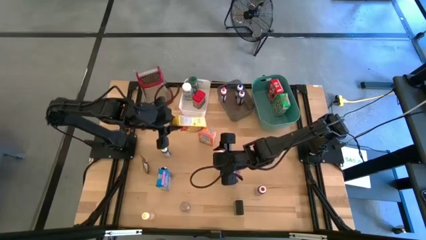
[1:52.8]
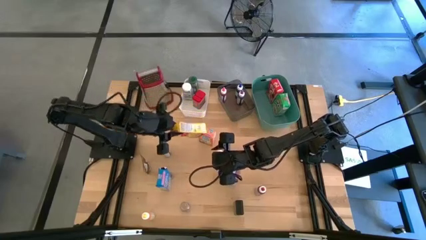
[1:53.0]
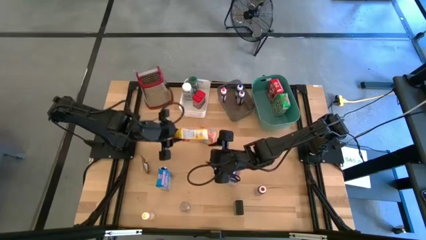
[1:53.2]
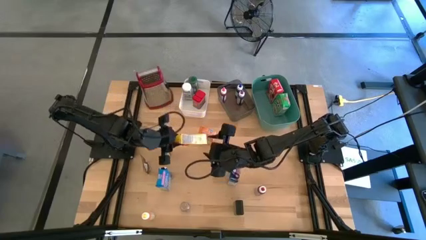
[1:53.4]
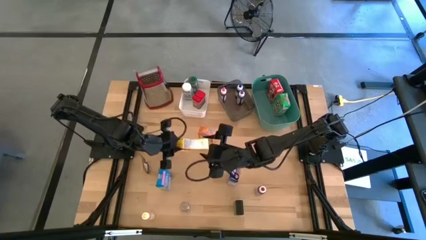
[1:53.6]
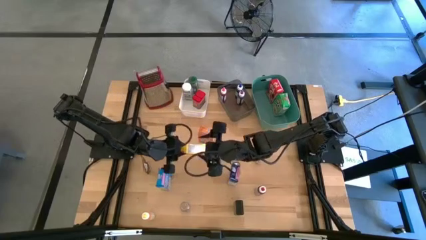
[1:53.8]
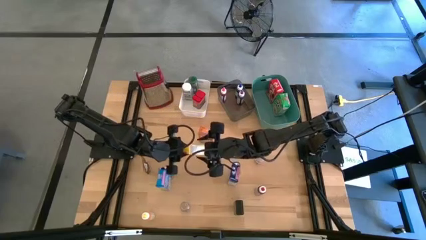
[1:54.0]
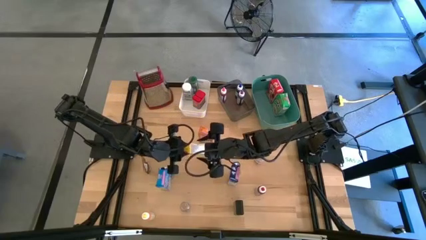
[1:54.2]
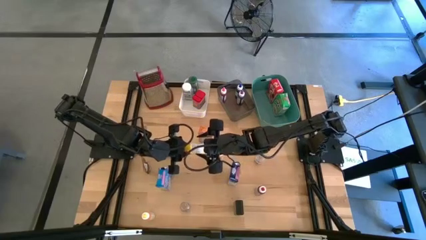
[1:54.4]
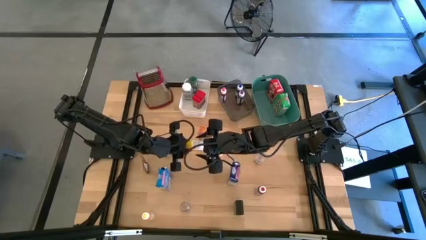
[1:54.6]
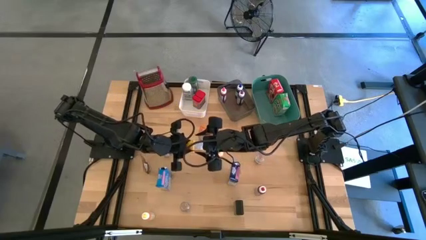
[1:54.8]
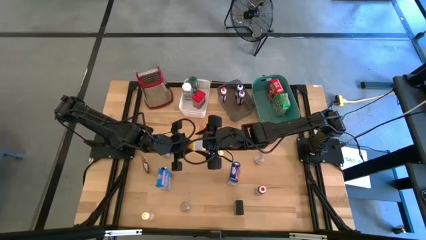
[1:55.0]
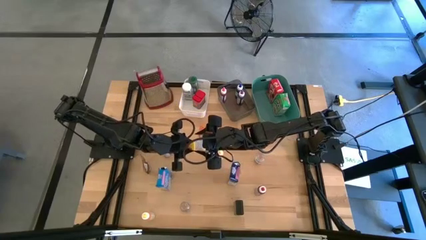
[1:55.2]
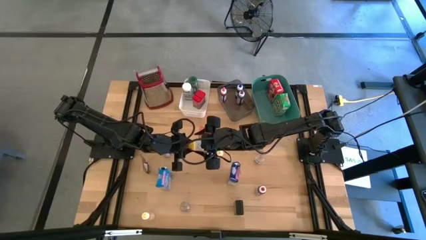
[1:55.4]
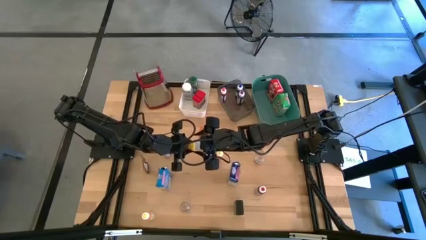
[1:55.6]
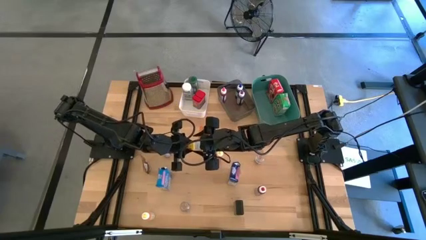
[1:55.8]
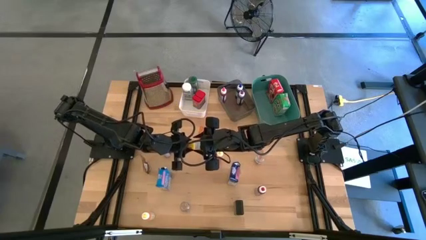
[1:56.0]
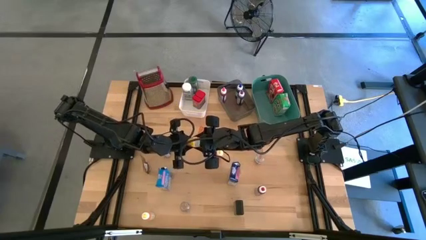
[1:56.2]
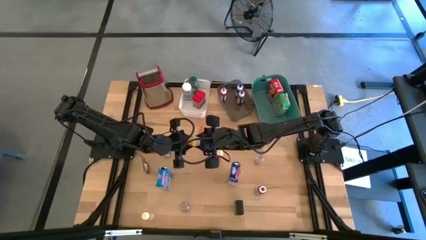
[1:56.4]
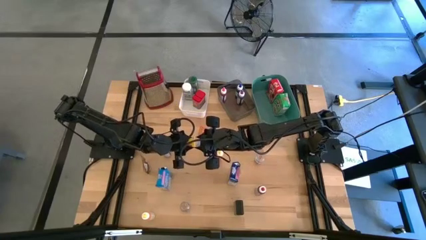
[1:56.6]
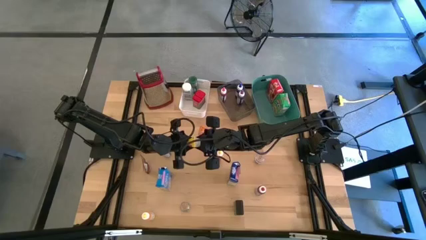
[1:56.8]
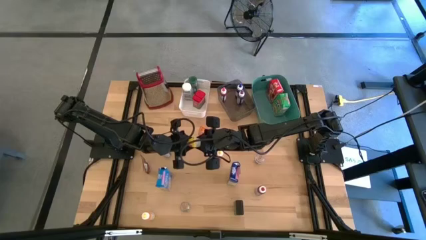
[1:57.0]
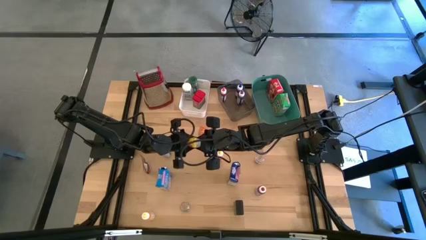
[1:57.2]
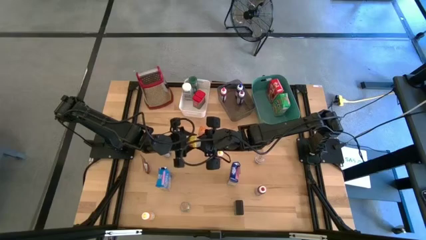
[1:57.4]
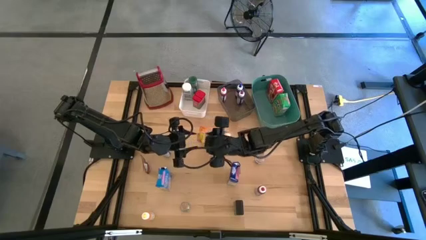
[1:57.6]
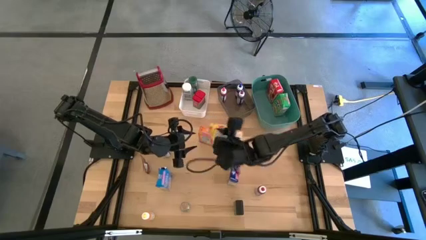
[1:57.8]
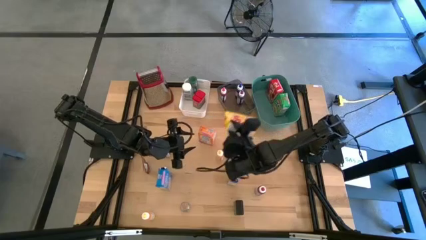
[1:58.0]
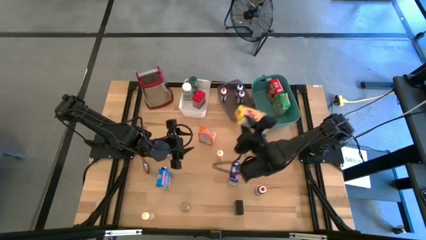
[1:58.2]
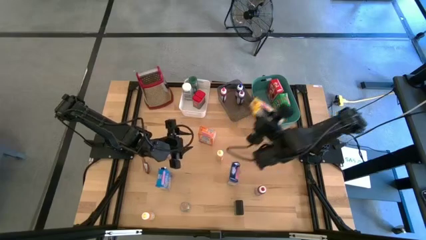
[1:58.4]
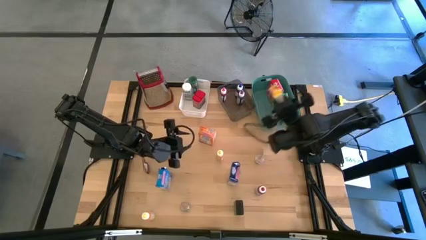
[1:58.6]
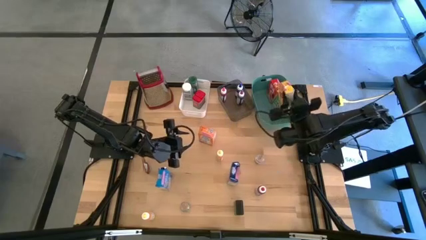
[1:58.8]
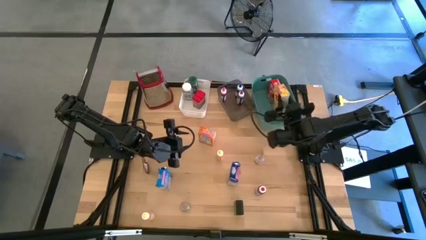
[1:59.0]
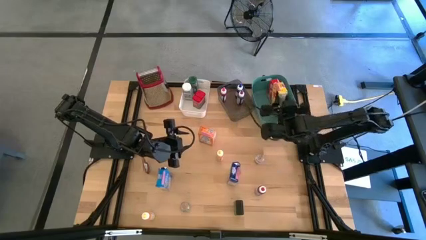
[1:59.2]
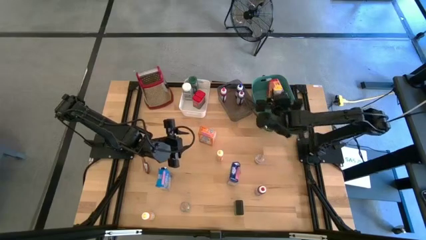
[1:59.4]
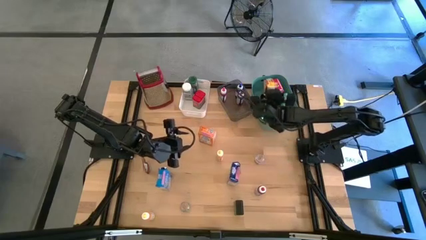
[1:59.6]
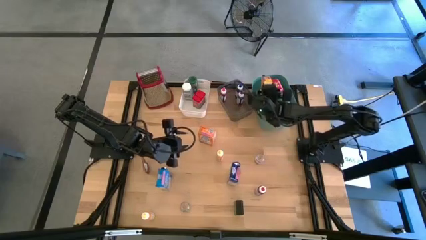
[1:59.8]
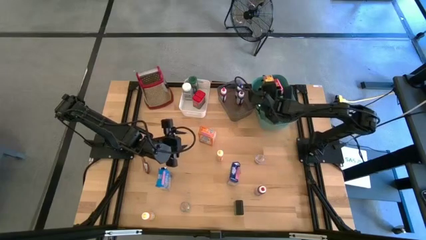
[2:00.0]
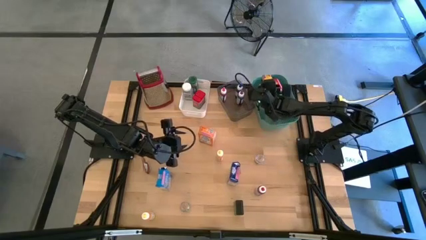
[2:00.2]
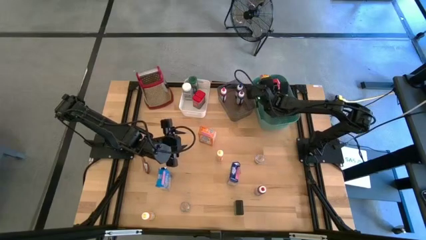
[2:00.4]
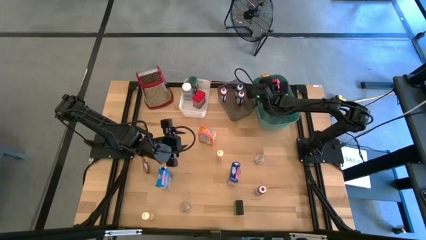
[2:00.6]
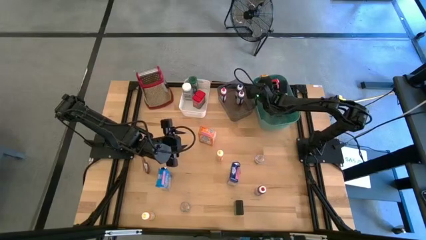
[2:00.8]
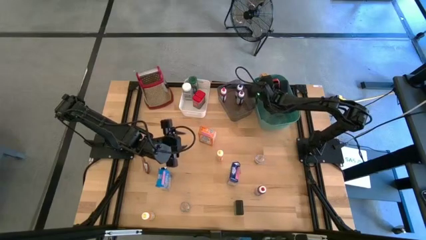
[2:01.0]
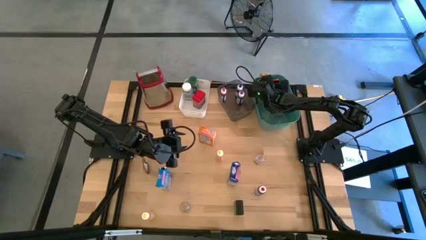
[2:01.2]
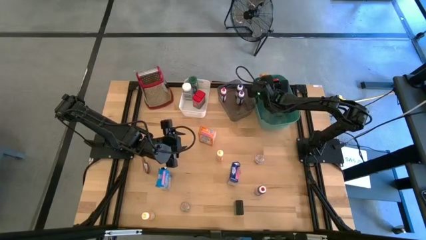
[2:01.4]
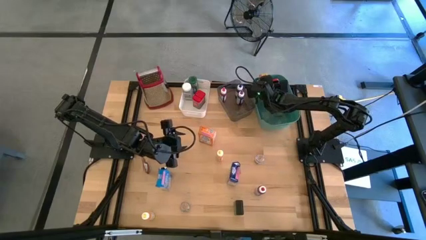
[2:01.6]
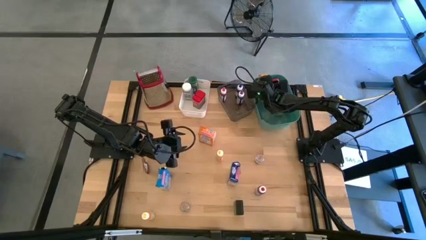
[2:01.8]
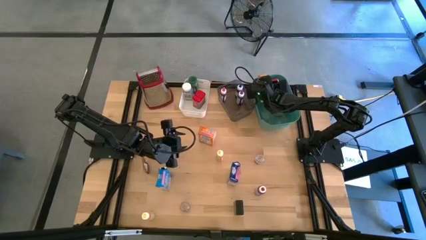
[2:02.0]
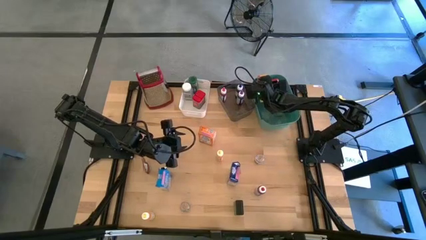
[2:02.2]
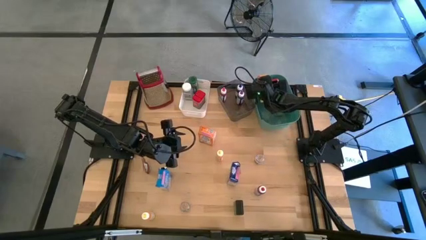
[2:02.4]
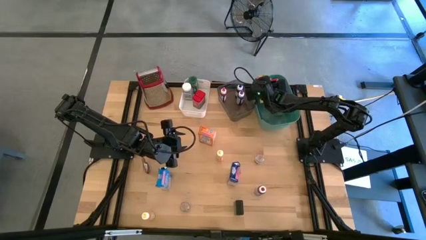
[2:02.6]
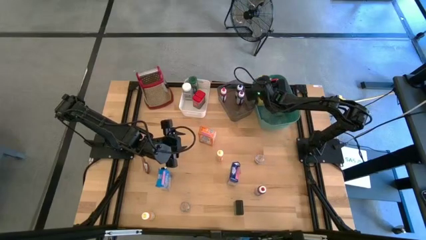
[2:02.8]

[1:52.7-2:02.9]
Task: Pick & Place Kitchen Items
Put the yellow cereal box into the green bin

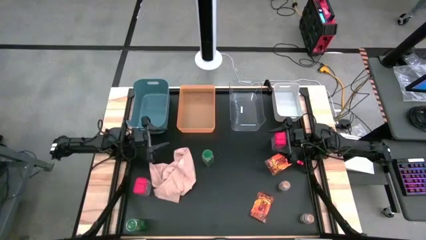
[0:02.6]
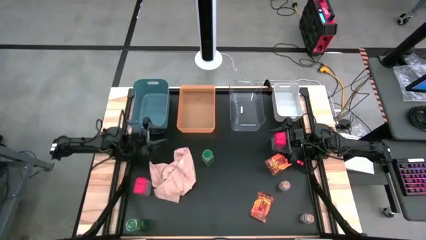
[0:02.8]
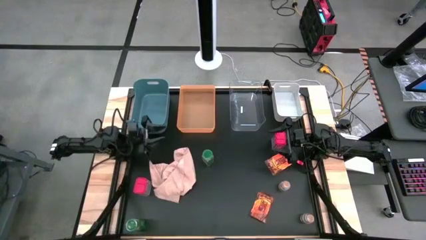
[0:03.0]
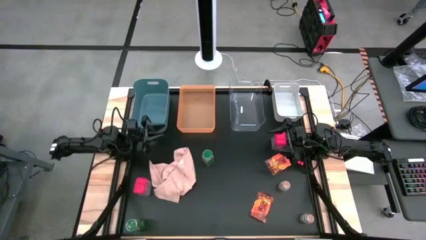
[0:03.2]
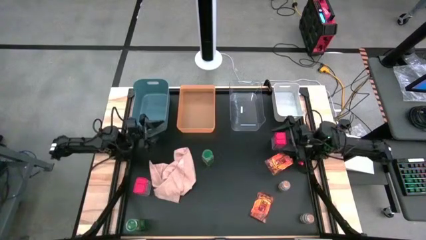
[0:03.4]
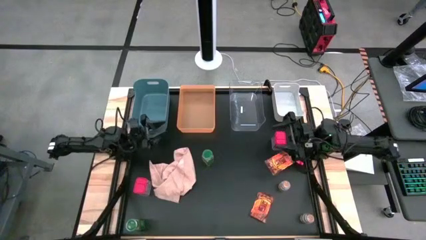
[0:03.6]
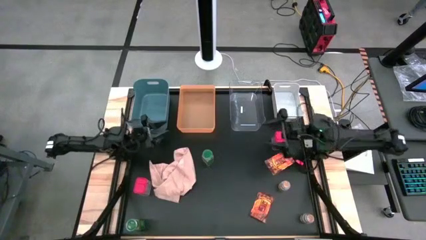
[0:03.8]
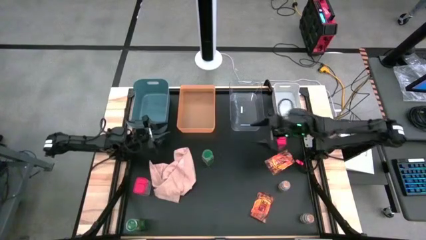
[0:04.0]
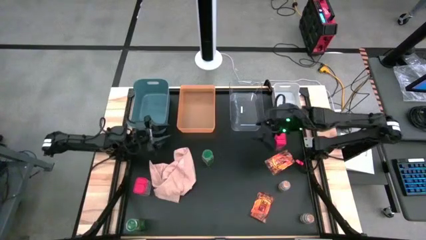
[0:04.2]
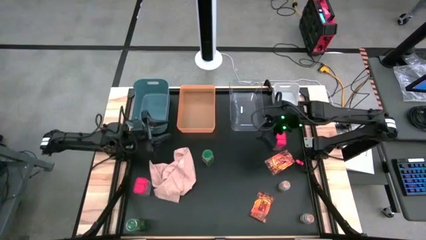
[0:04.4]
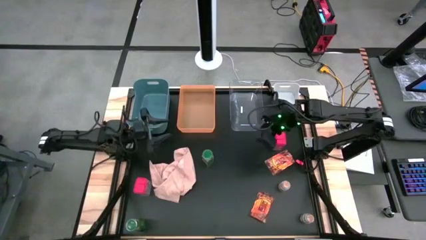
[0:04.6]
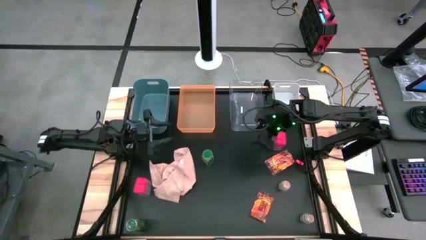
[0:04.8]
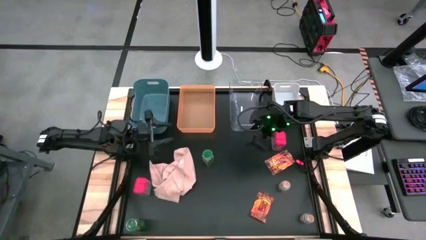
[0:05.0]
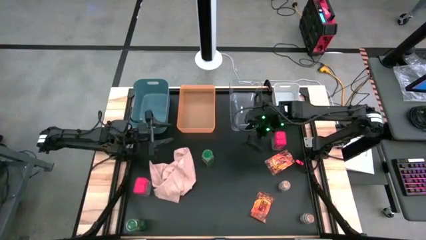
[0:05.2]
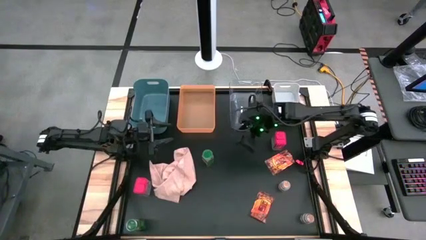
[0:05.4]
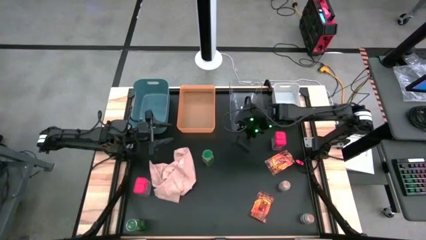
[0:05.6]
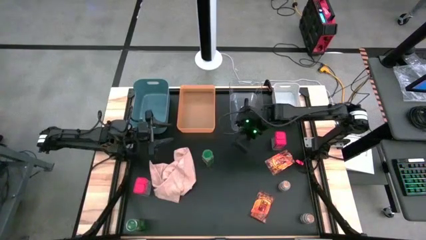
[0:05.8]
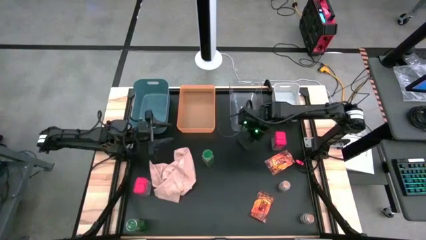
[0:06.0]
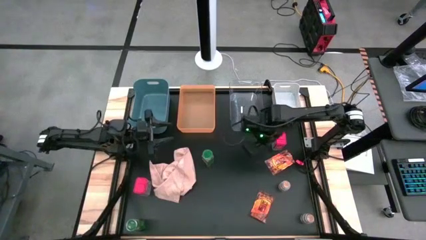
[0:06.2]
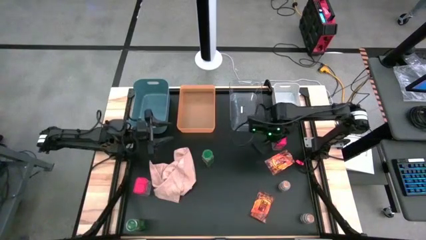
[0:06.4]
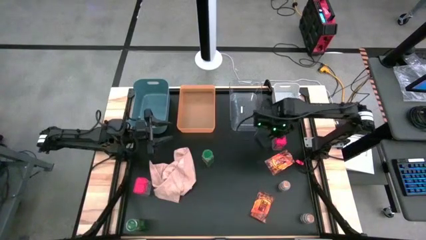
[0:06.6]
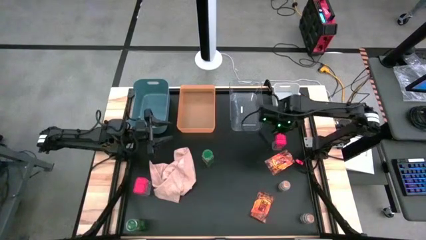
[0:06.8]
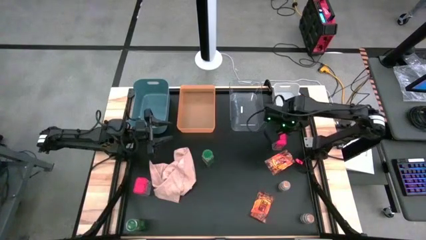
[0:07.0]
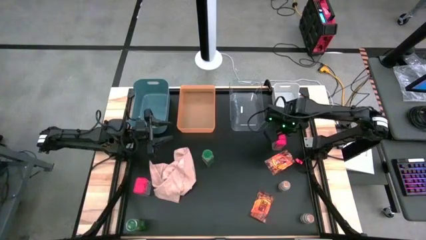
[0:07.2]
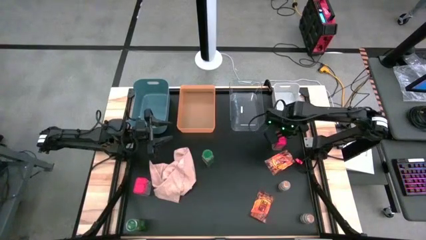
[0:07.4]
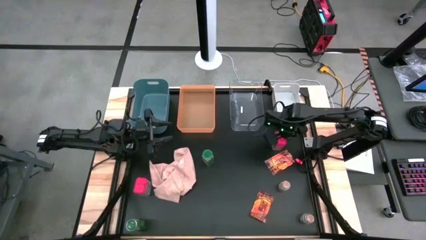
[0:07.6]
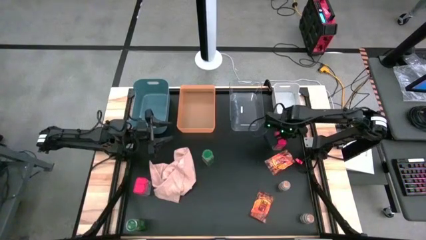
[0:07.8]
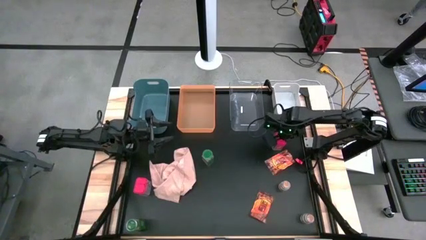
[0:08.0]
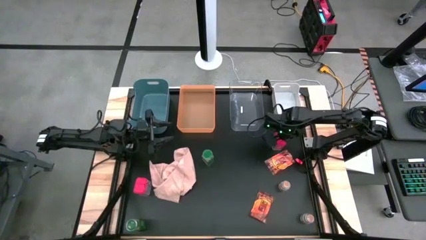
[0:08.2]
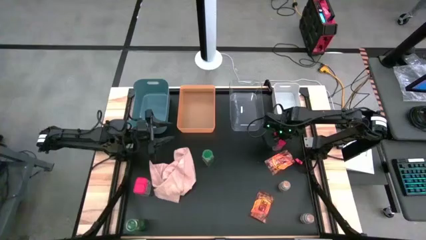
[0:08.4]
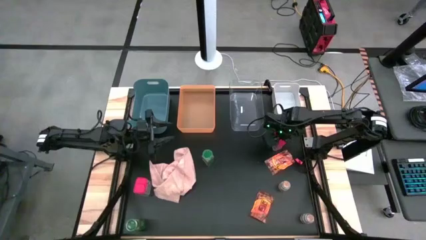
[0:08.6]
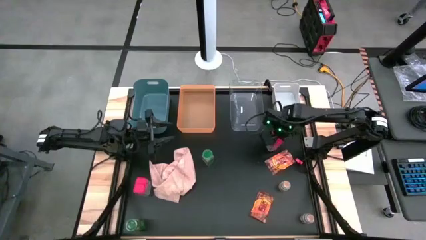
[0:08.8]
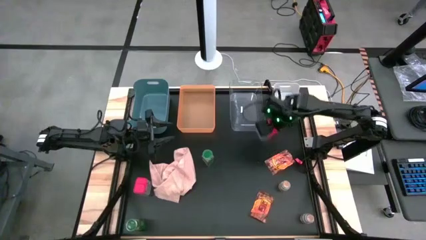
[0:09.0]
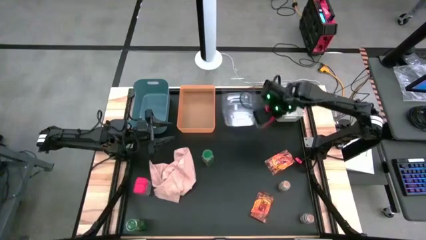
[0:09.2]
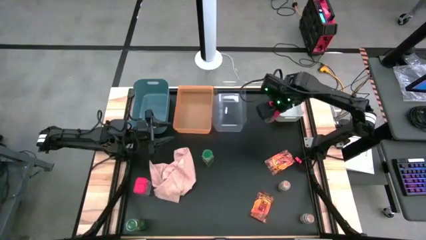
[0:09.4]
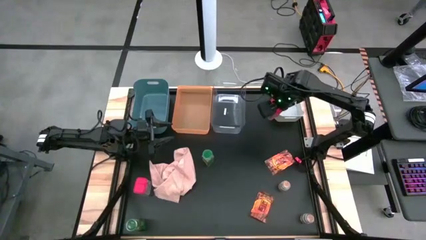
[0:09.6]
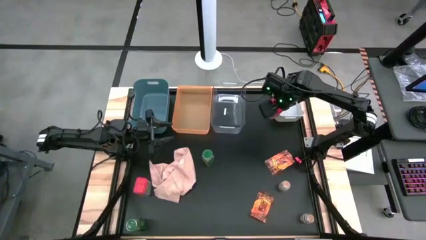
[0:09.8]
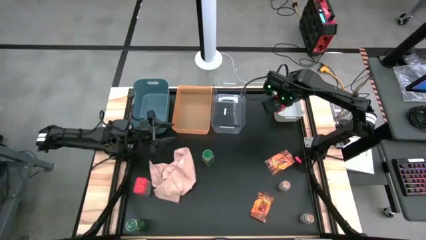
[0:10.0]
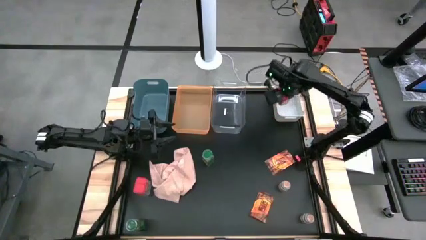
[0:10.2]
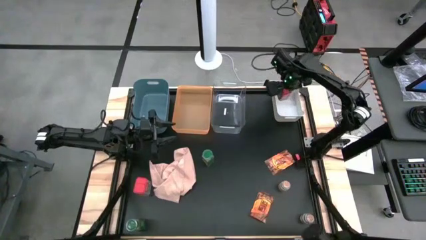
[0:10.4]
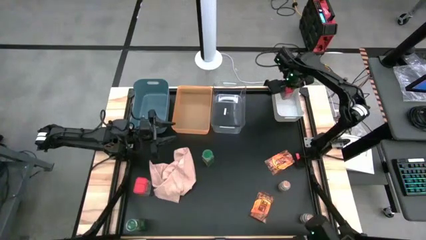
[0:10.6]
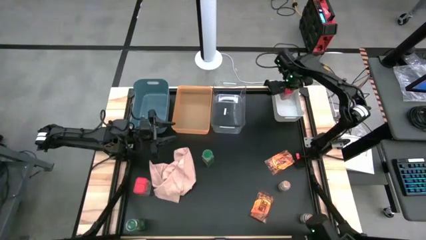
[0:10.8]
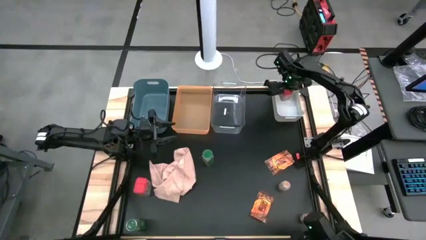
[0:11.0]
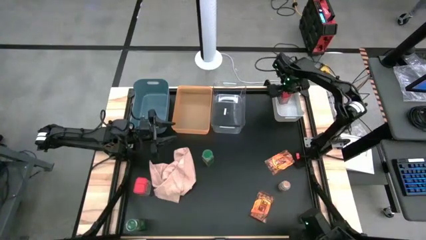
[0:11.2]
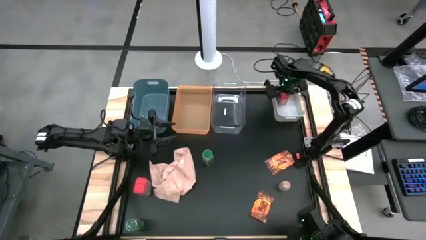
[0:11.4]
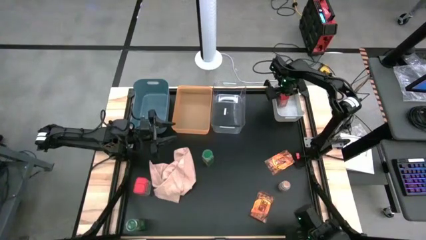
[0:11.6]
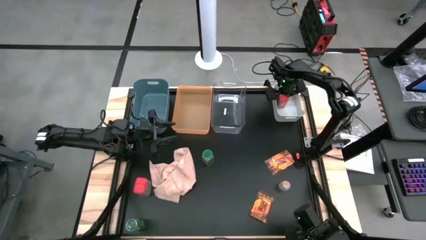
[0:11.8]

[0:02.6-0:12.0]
Task: Sort spices by type
Put the right red seasoning can into the white bin
